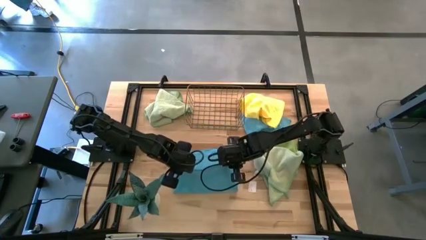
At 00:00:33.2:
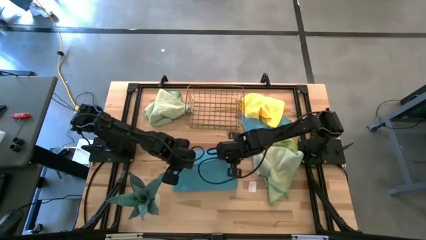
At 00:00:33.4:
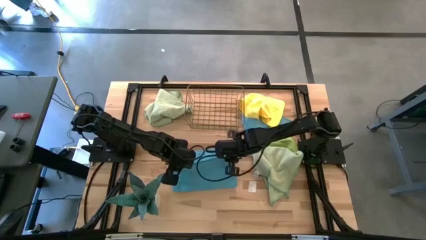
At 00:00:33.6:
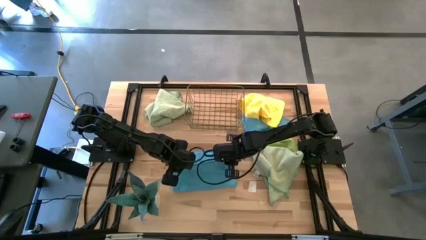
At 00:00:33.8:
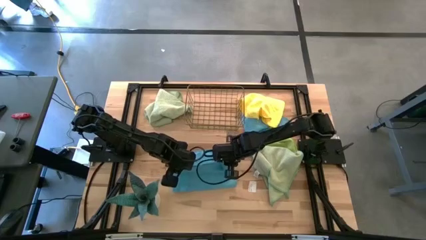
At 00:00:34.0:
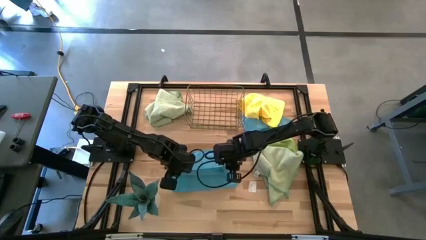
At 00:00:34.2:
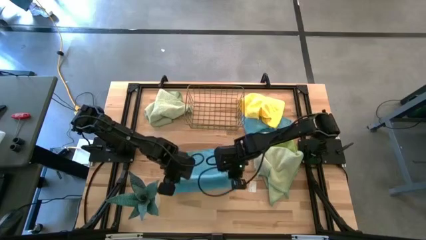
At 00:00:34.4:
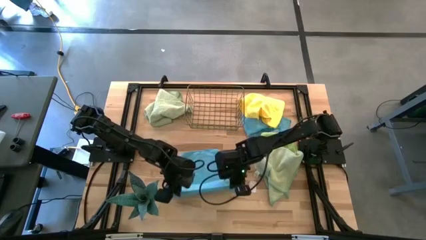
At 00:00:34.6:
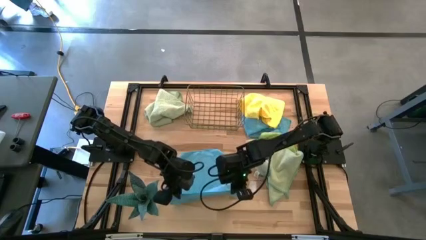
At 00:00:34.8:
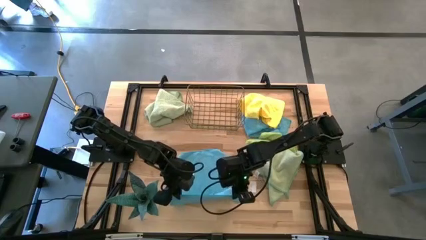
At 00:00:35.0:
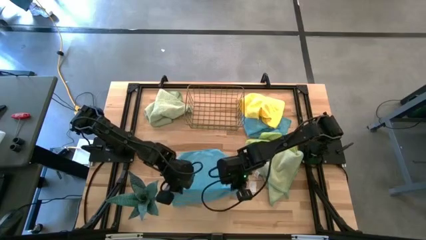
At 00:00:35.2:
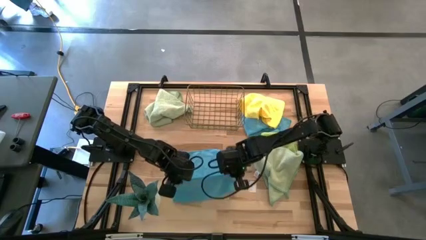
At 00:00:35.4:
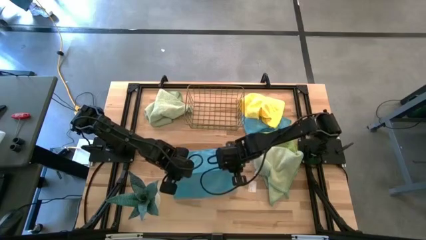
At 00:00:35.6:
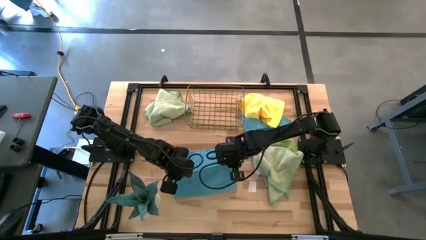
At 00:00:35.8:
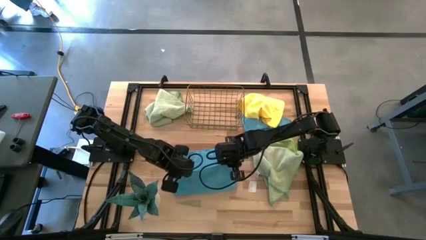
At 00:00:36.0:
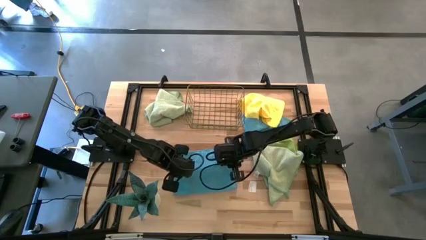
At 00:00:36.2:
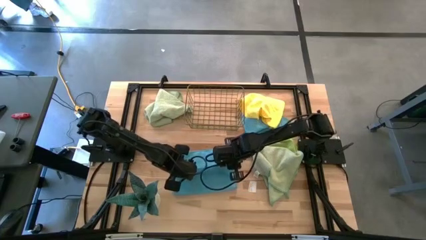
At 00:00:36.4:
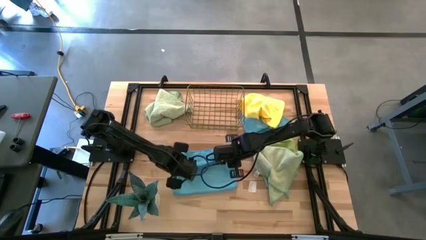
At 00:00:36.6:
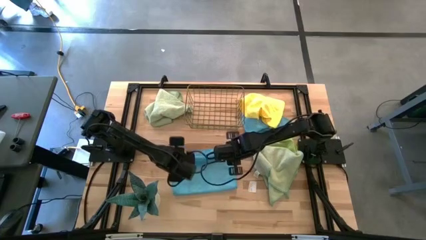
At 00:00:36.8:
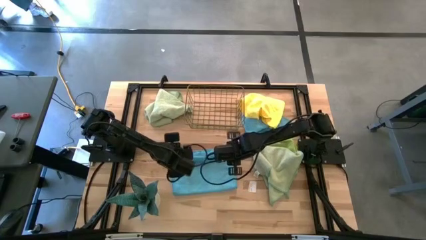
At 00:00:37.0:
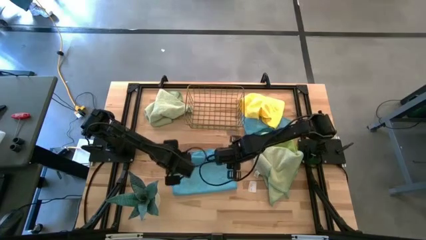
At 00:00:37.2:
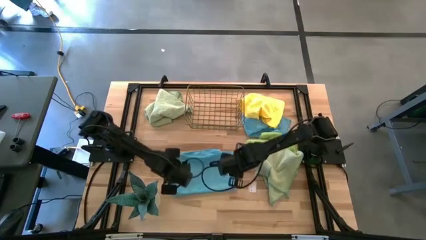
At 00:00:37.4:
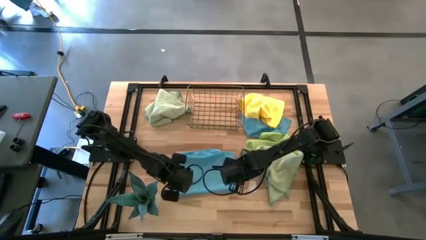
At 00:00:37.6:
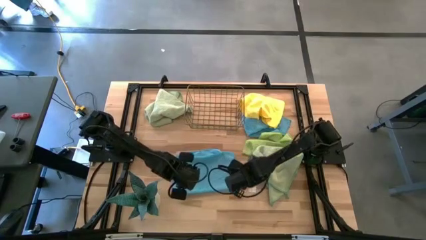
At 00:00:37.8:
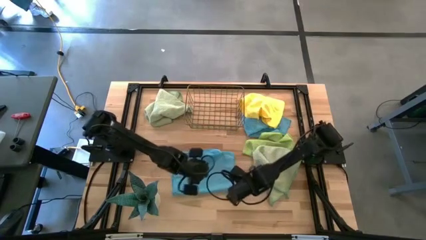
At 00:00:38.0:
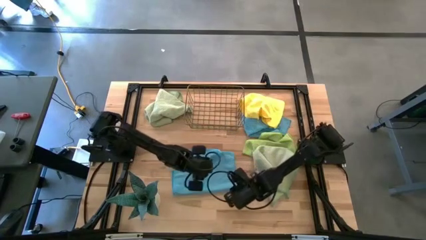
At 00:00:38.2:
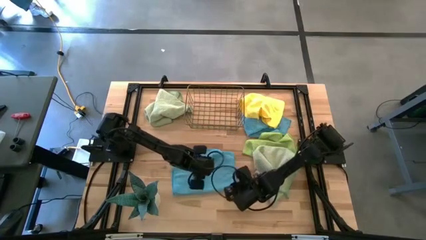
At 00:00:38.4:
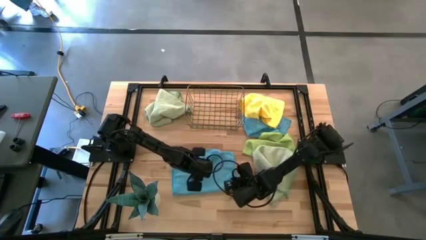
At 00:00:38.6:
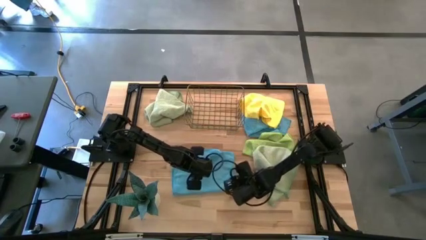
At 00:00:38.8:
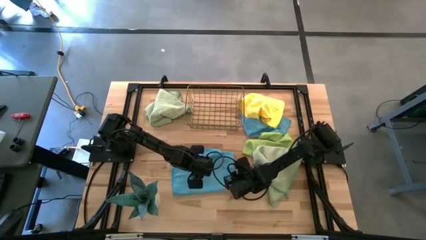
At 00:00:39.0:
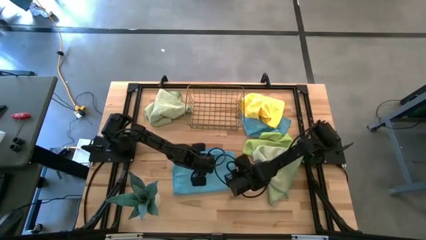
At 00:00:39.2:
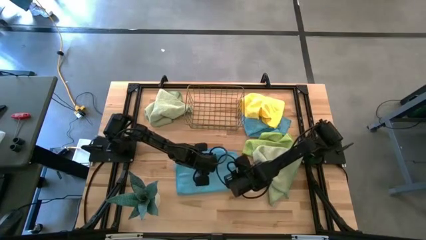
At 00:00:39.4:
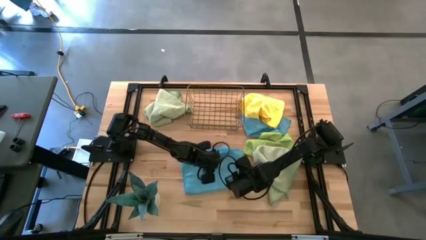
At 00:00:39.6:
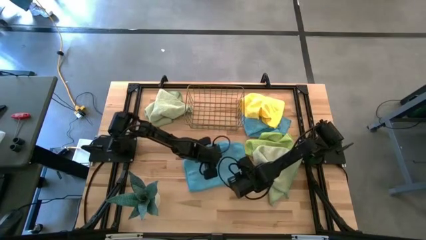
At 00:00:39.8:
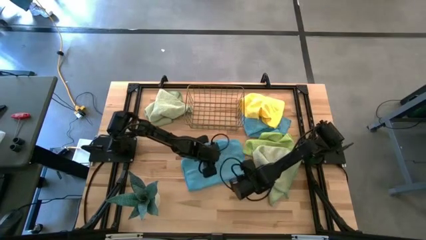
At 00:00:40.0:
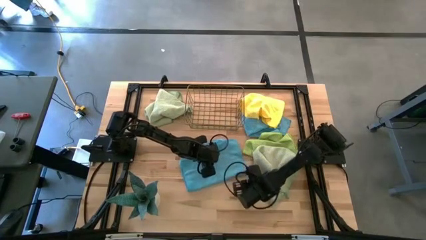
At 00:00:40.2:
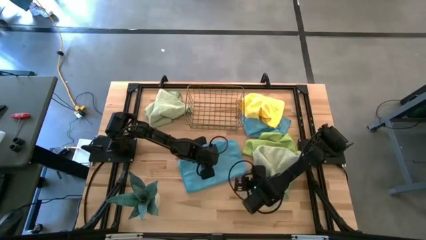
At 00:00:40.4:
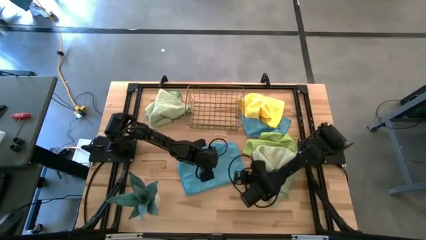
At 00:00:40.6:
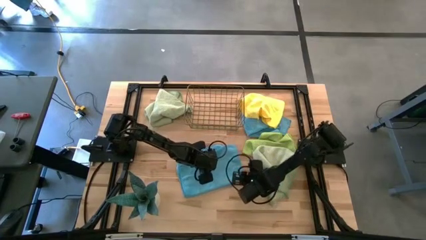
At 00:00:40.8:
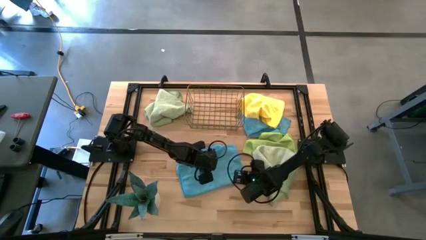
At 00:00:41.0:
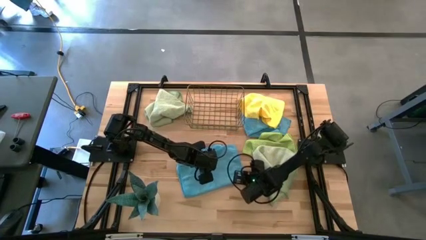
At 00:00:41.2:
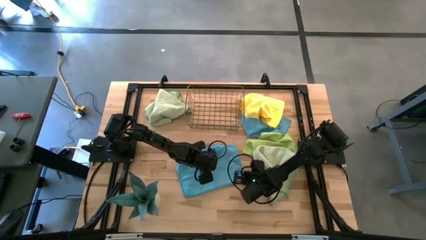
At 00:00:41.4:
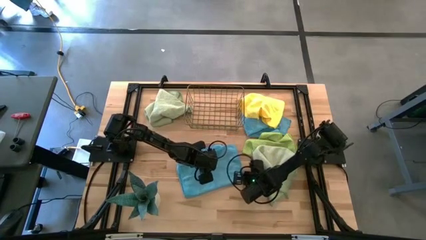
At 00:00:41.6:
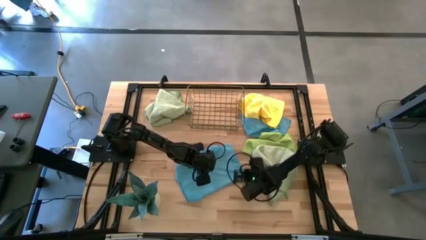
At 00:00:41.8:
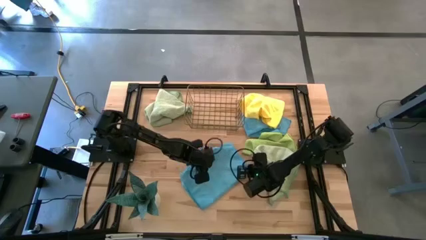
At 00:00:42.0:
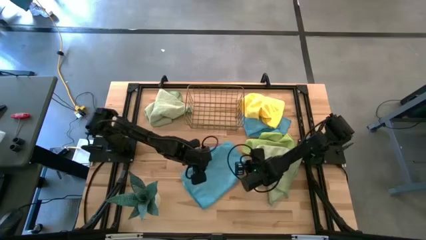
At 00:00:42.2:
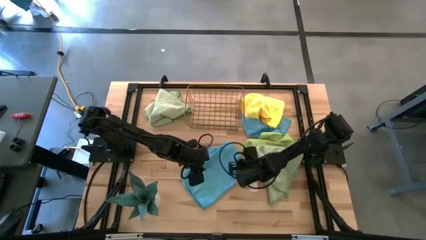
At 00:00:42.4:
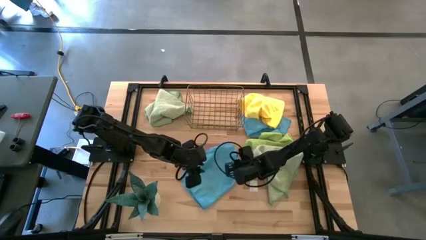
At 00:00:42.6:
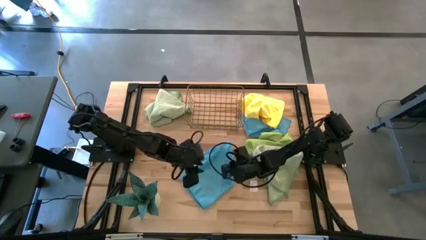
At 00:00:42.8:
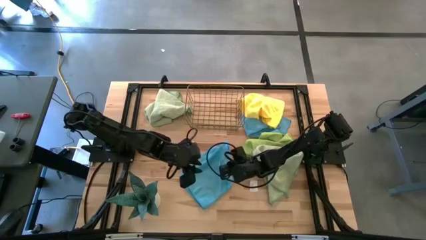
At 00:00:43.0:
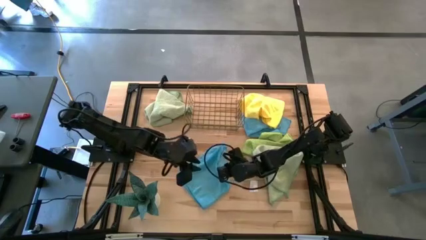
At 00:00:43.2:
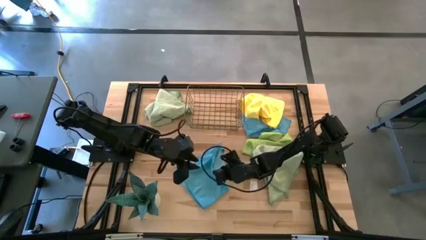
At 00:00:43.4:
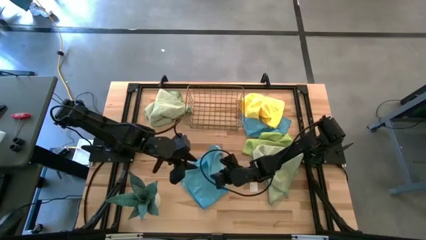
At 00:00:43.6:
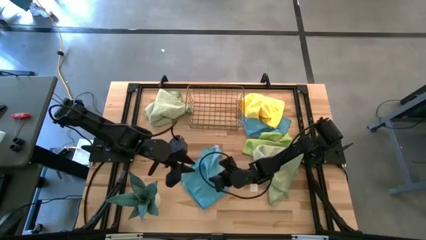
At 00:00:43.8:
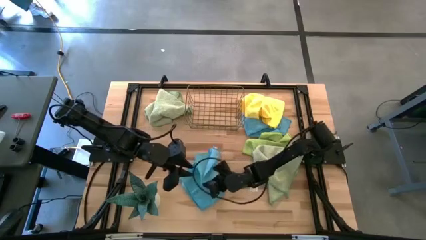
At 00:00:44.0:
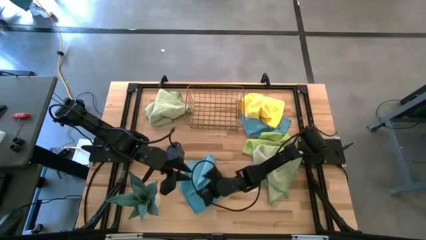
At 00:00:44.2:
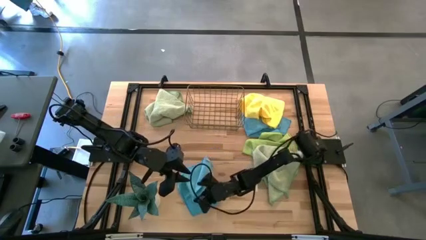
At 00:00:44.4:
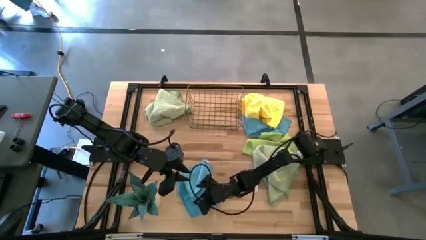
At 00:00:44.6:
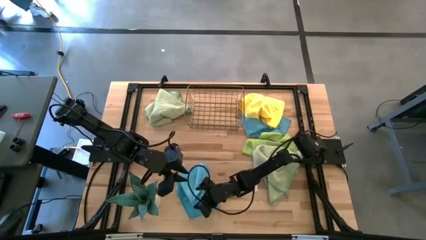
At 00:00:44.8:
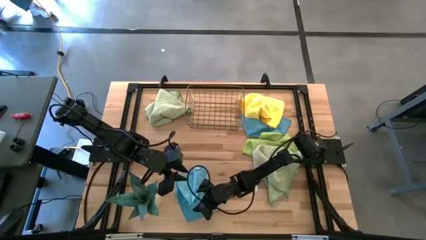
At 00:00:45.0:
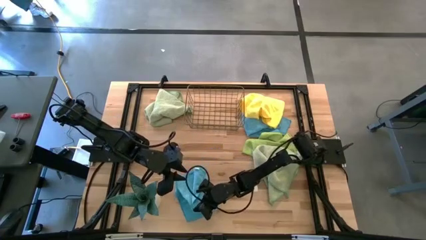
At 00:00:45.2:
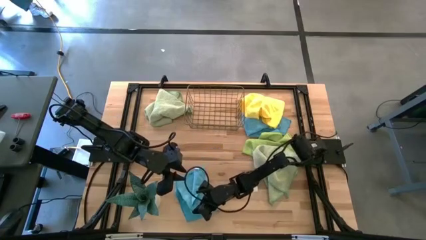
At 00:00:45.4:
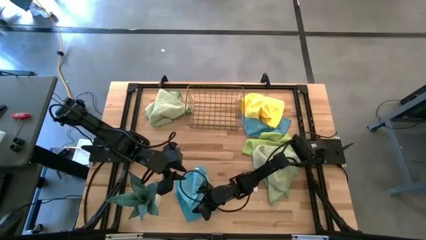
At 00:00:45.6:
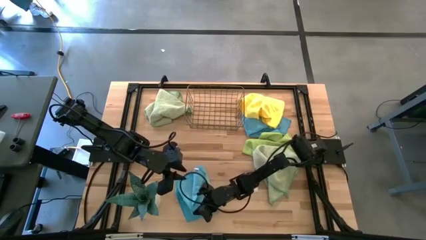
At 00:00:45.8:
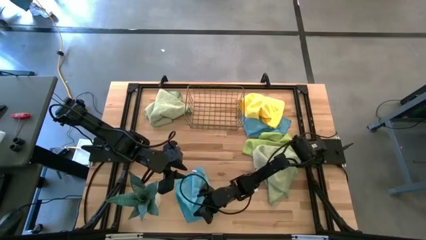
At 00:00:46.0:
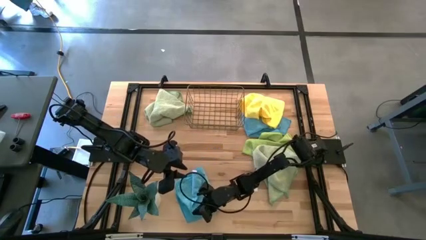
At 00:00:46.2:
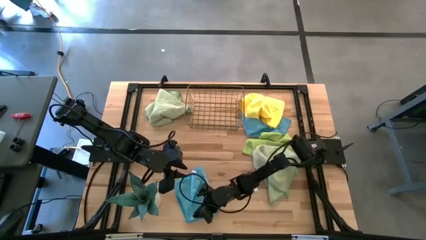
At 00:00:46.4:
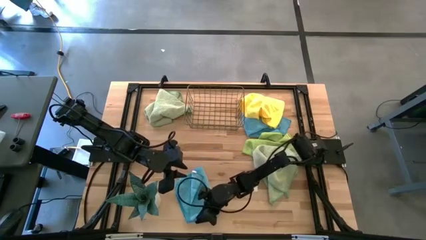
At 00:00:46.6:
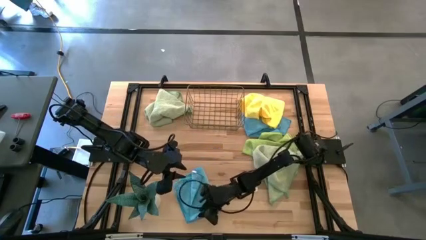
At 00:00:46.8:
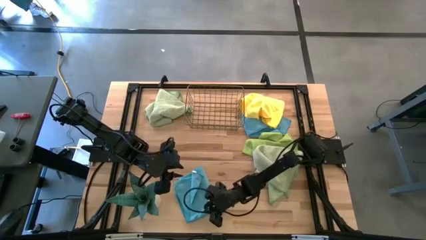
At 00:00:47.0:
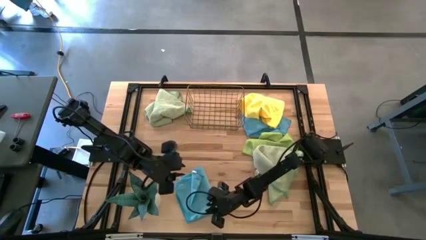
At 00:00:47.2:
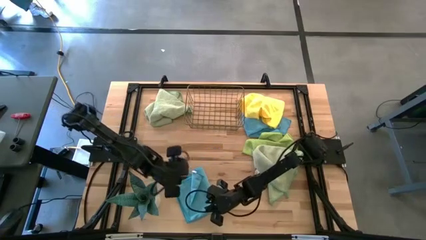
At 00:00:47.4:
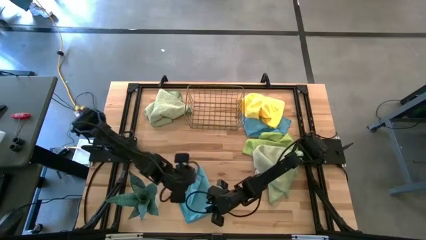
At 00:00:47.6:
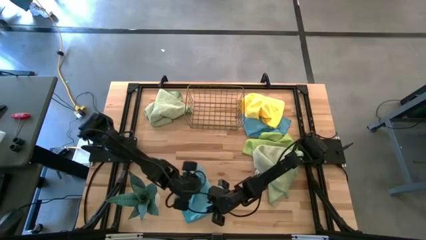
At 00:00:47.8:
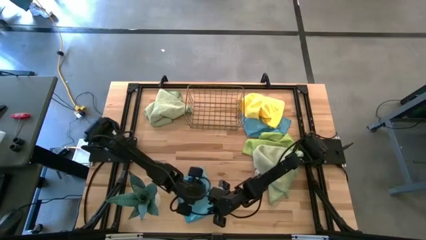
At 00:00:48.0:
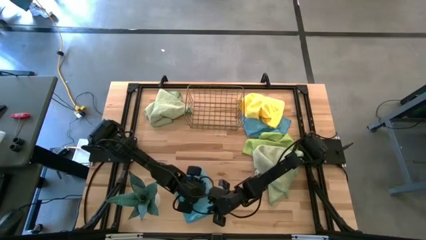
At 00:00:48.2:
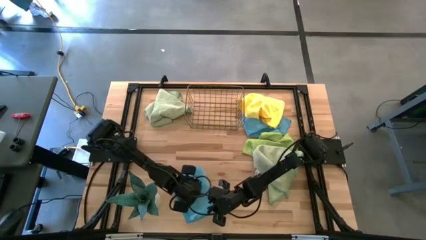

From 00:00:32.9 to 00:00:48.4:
Task: Fold microfiber towels
Fold the left blue towel
